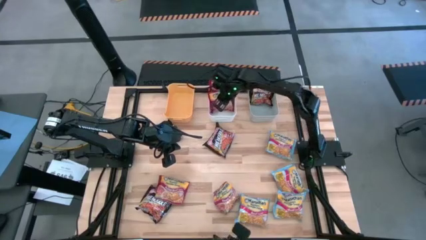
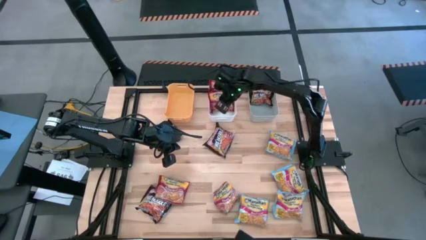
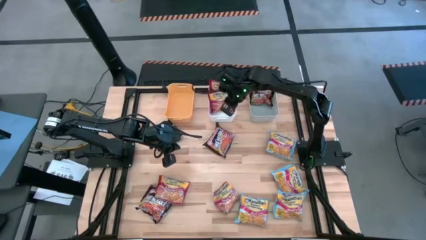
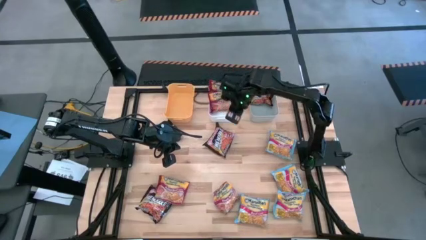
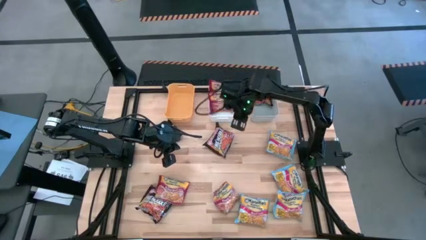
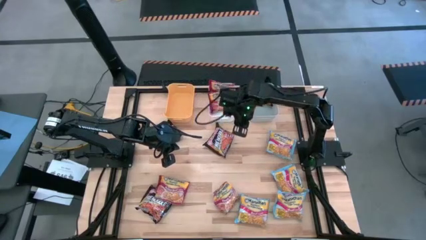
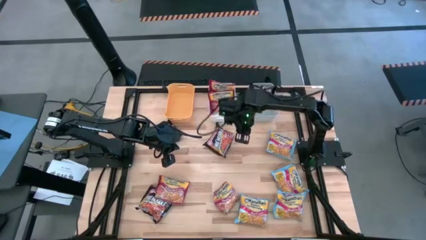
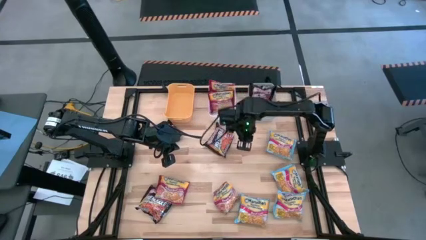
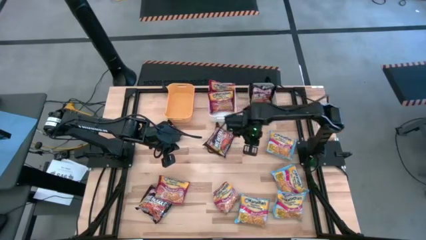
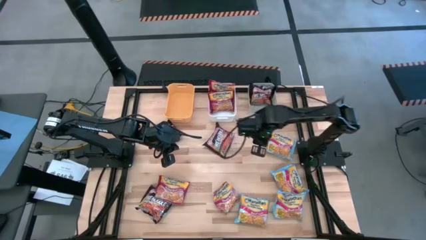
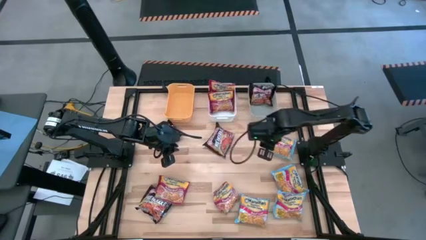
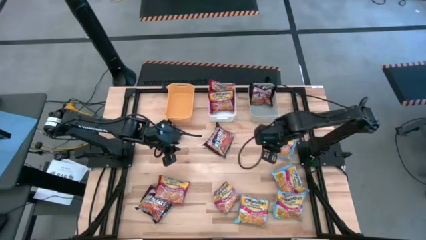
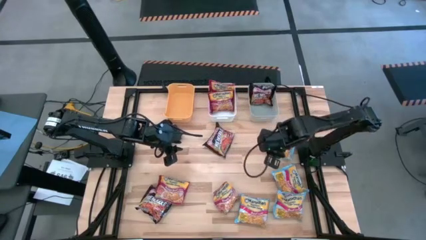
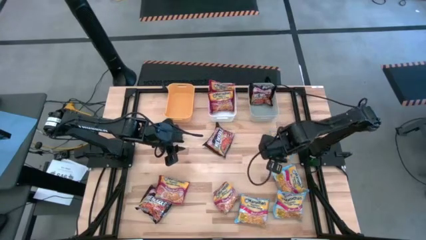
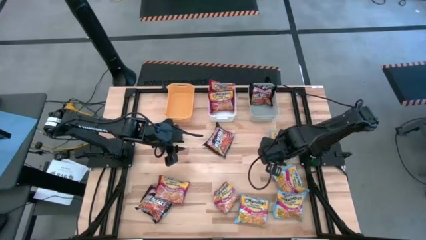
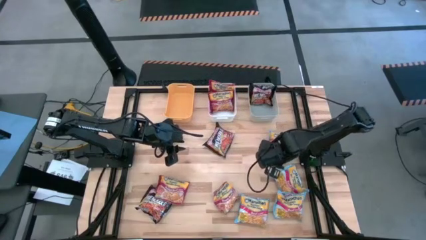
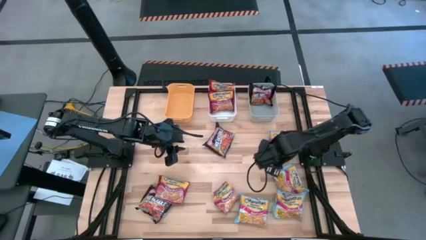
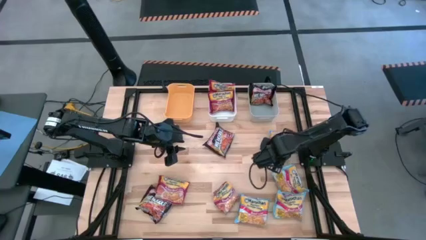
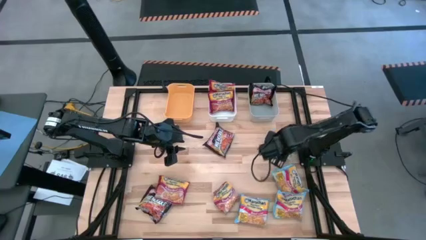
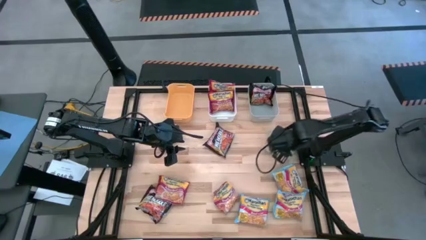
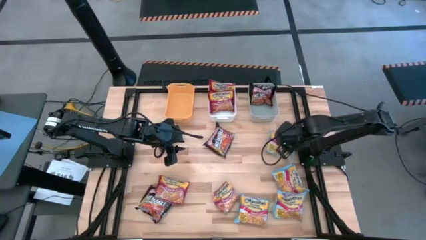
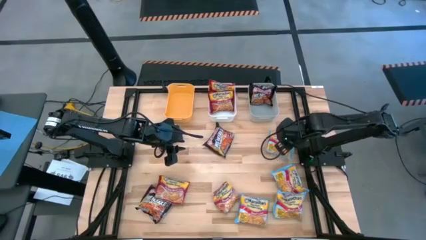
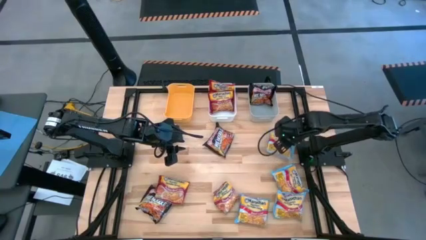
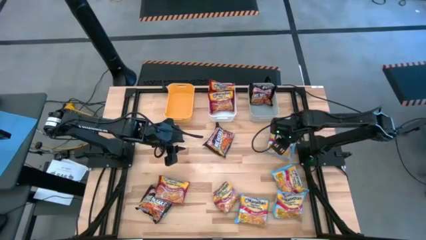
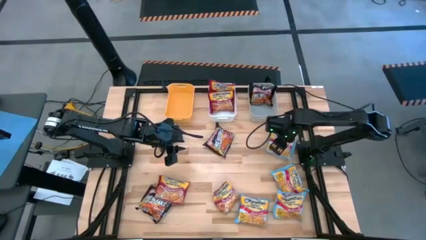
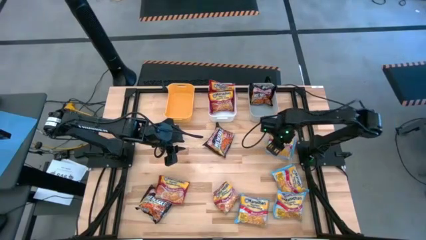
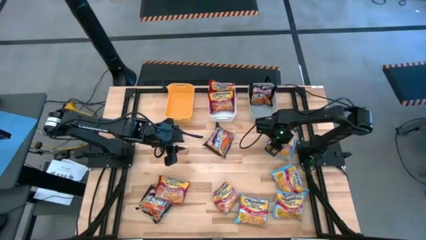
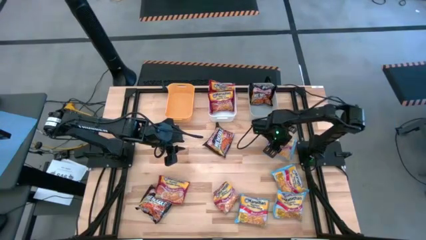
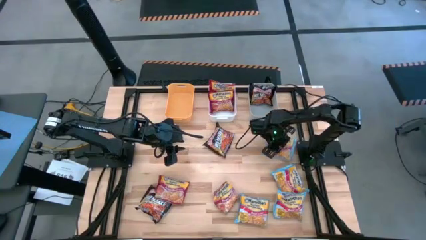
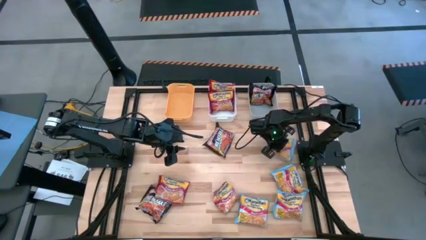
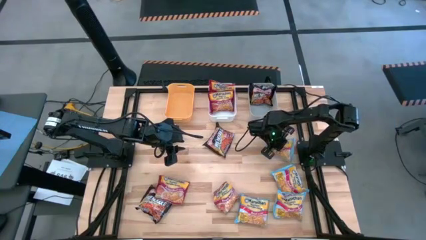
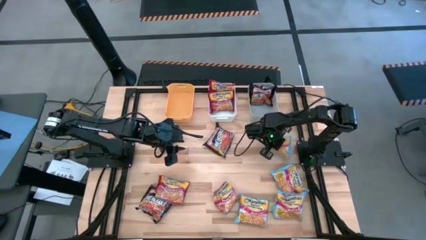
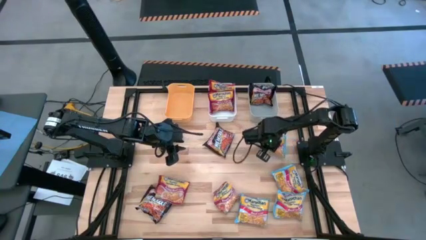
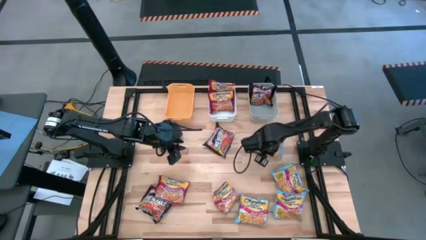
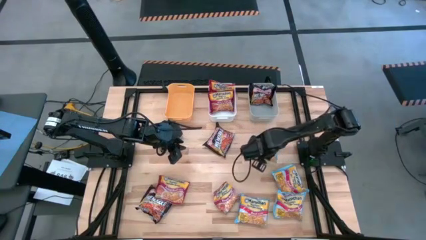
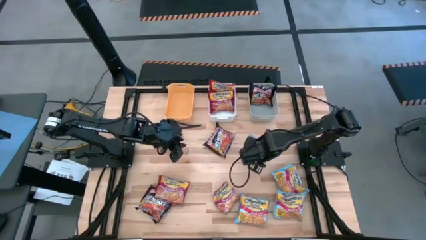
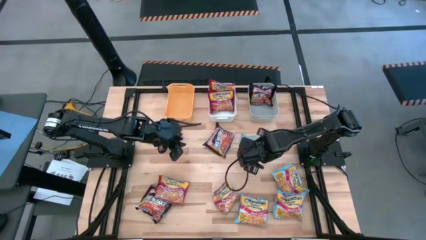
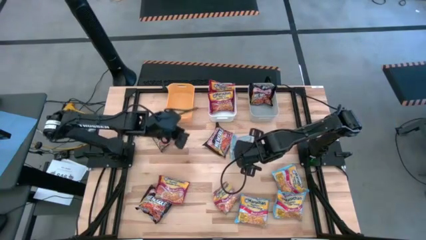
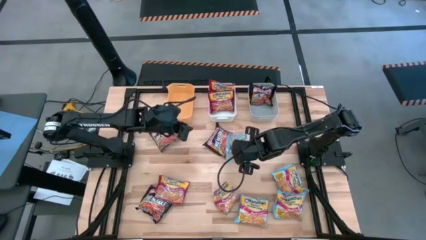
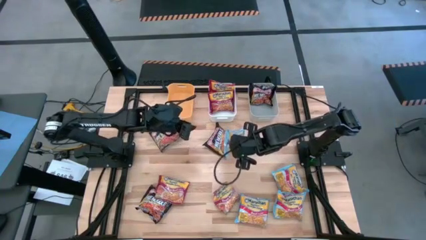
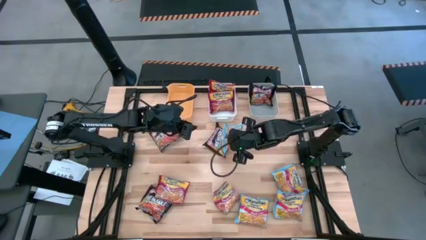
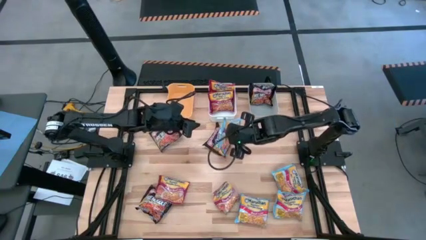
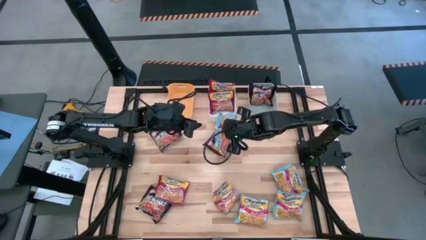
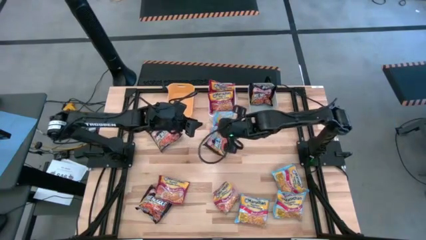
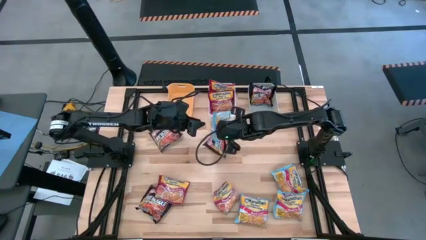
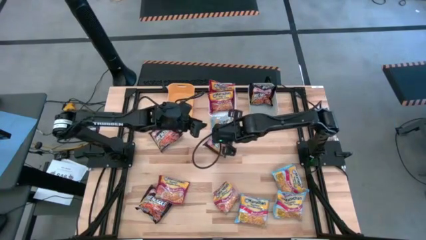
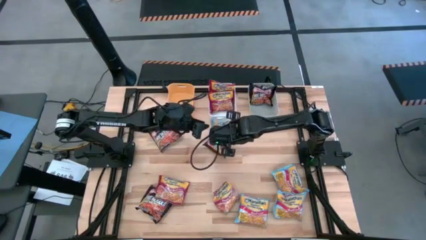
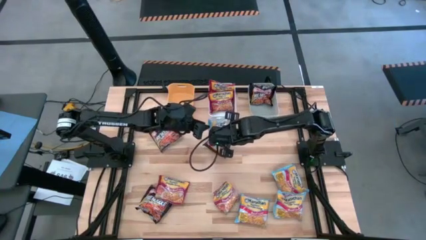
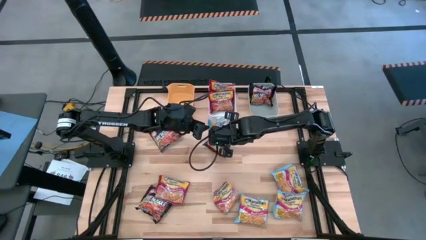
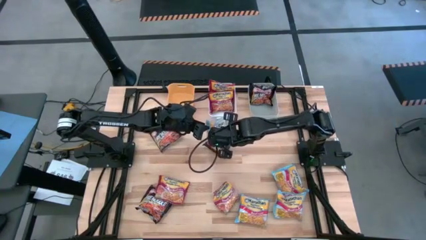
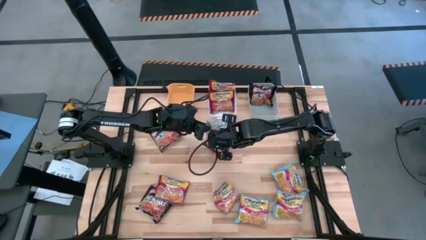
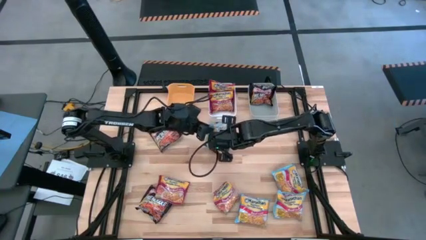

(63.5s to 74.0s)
Task: Sort Maruchan noodles
Put the blue noodle pack into the orange bin

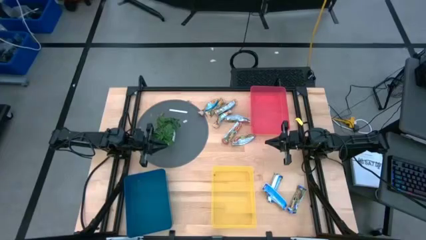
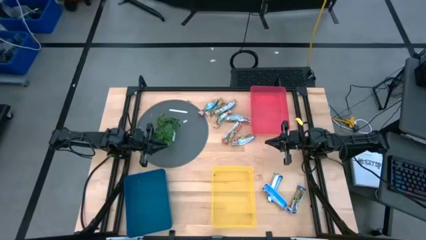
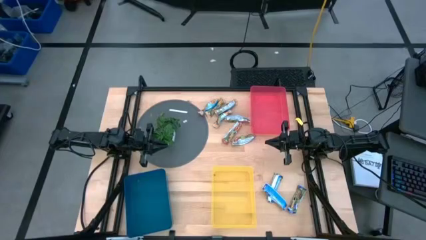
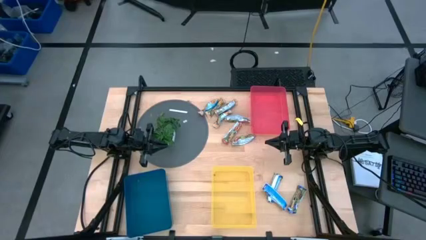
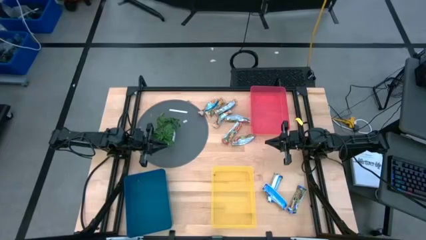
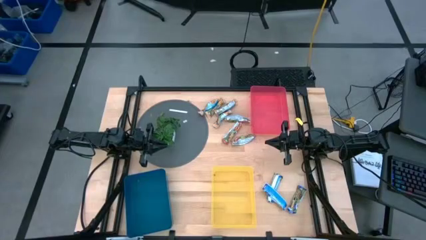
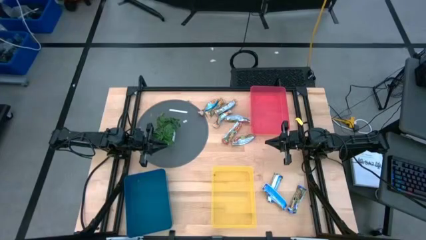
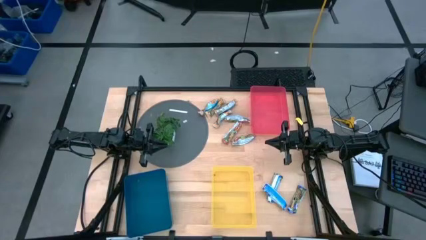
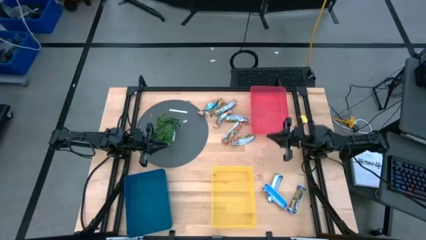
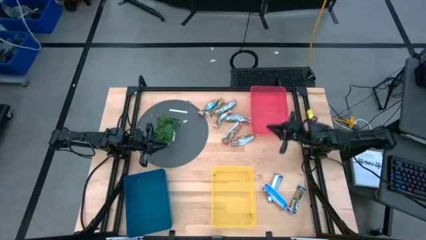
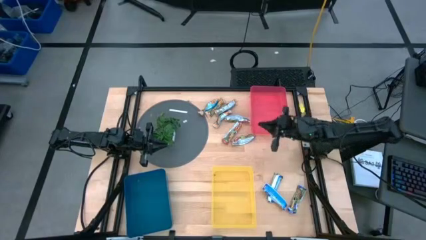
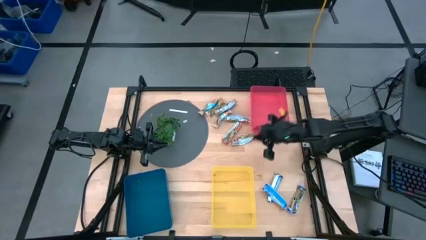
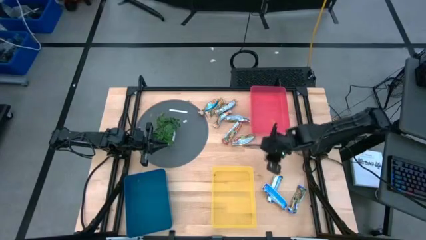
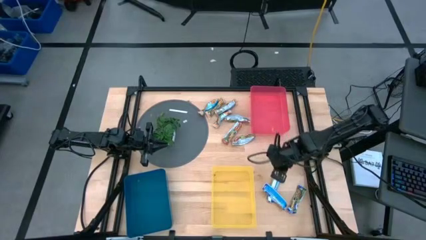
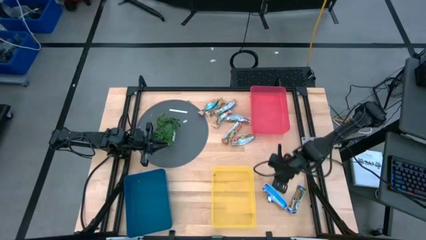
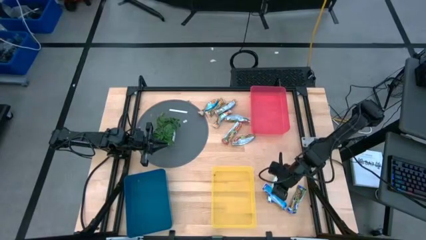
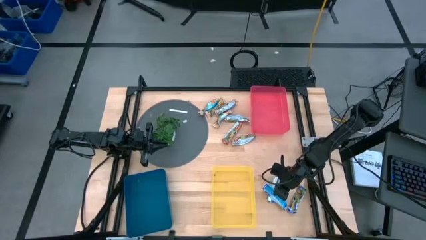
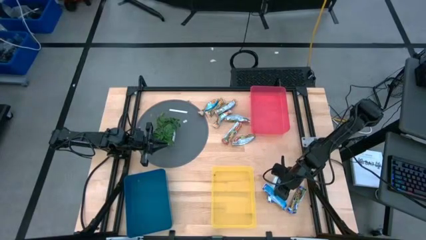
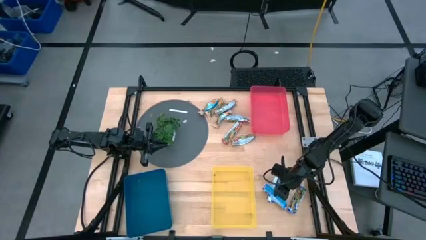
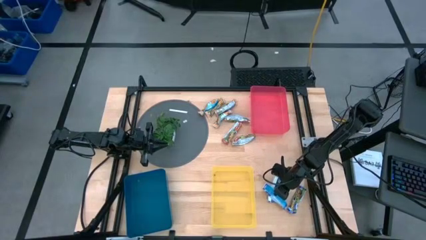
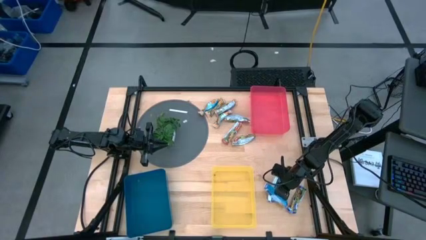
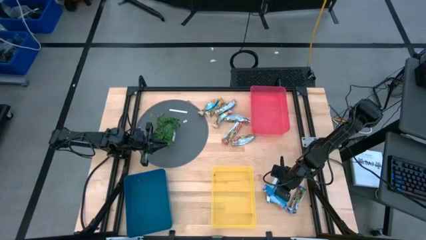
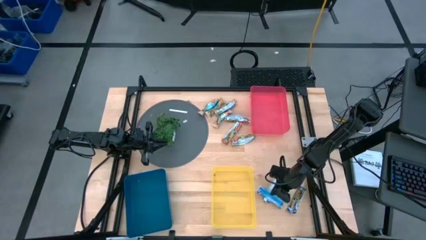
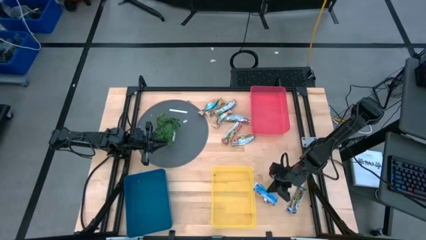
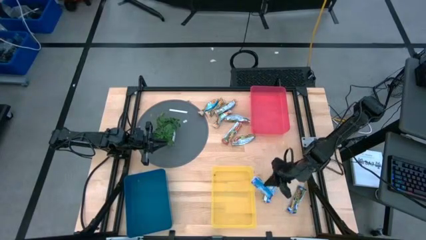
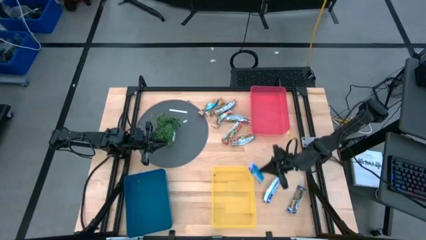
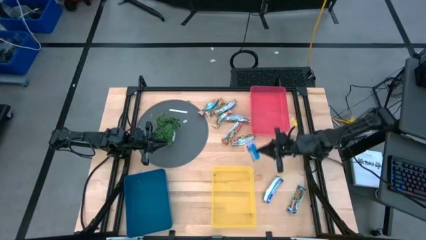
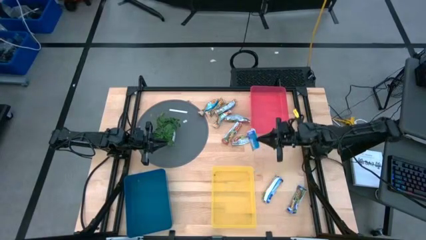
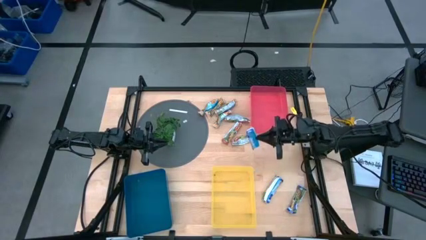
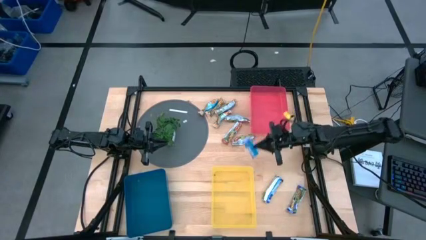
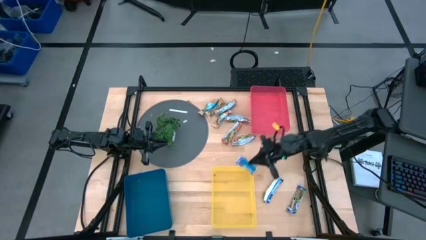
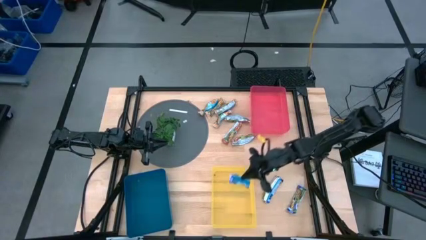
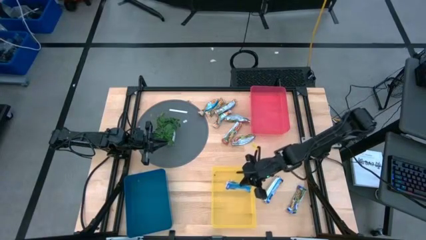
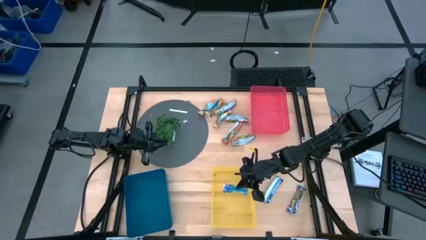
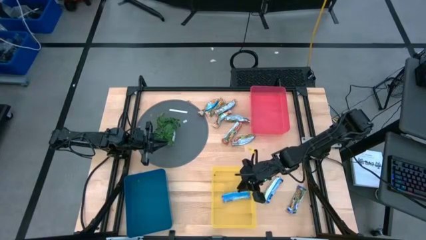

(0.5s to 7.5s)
Task: Pick and place Granola Bars by type
Put the green snack into the yellow bin
